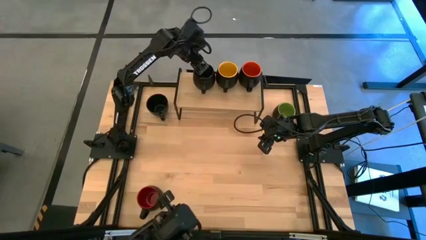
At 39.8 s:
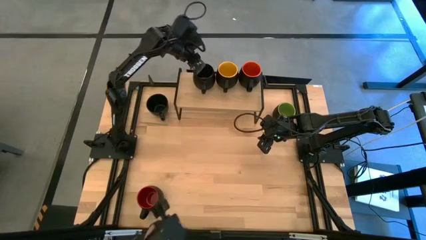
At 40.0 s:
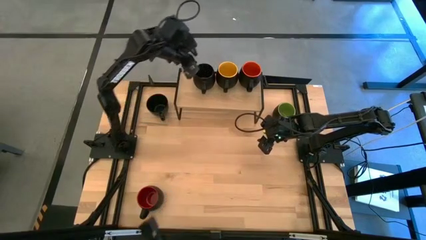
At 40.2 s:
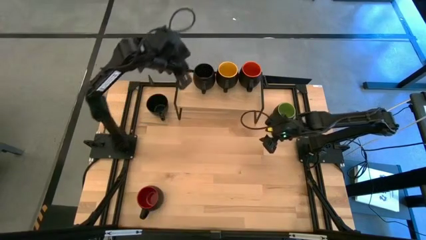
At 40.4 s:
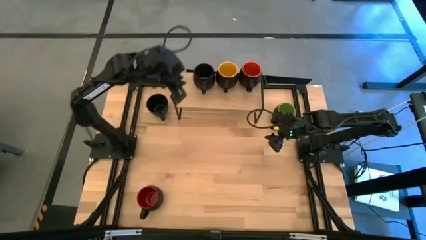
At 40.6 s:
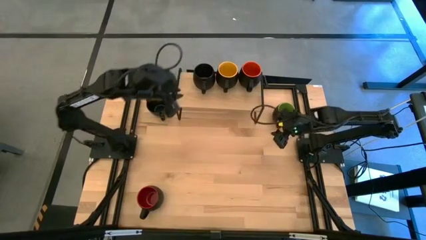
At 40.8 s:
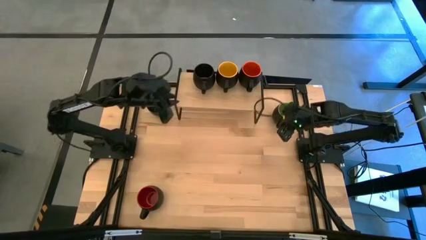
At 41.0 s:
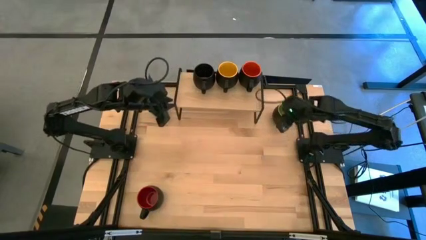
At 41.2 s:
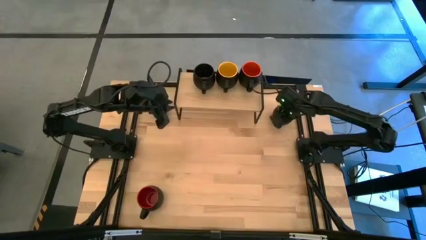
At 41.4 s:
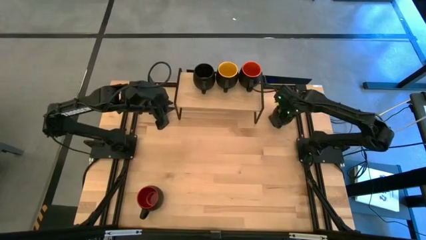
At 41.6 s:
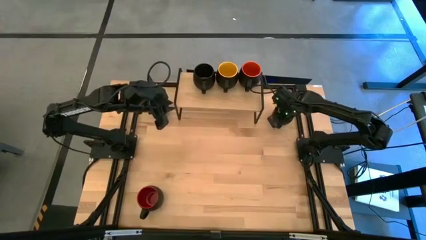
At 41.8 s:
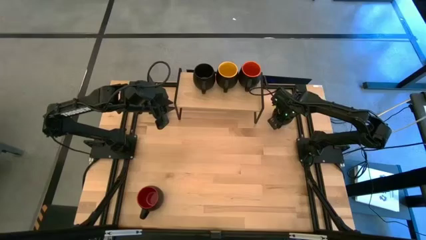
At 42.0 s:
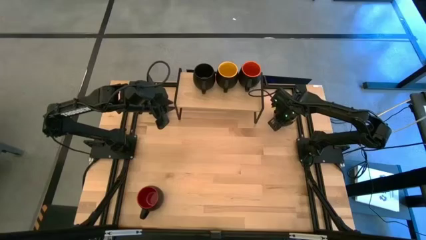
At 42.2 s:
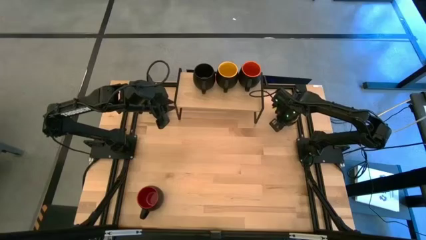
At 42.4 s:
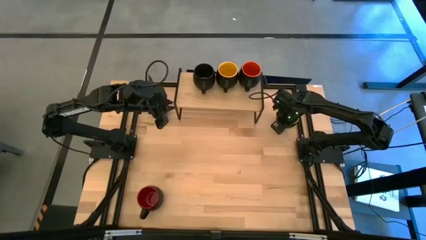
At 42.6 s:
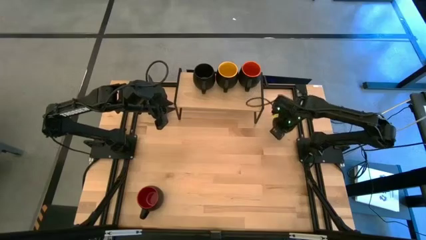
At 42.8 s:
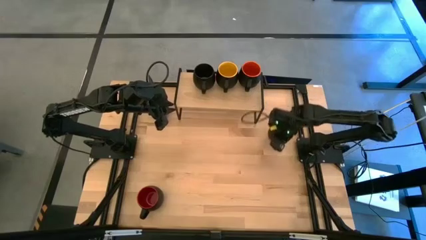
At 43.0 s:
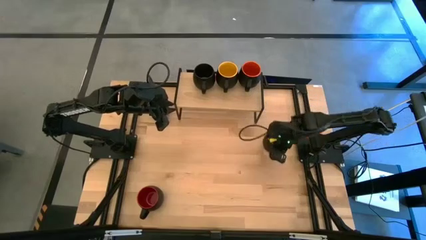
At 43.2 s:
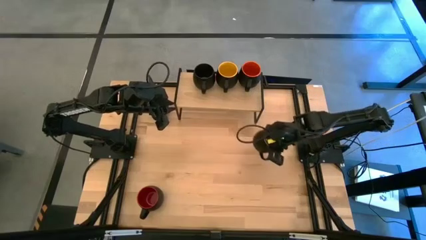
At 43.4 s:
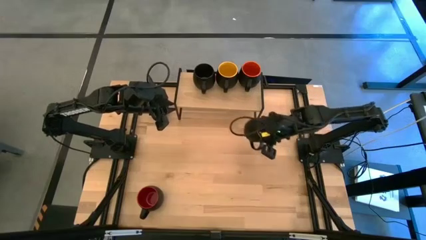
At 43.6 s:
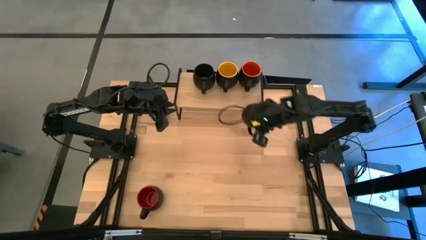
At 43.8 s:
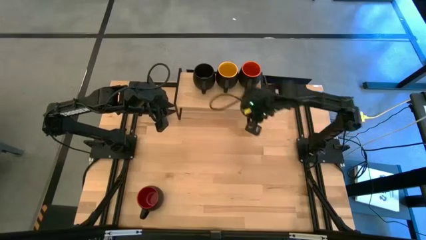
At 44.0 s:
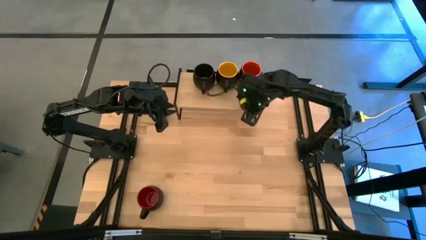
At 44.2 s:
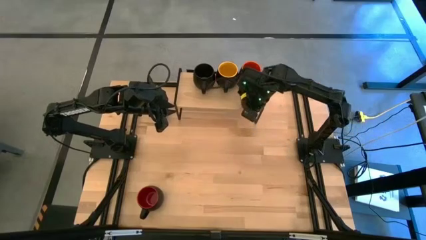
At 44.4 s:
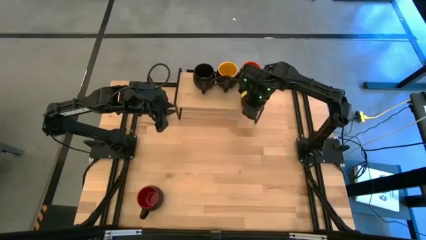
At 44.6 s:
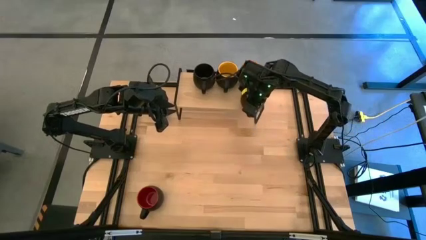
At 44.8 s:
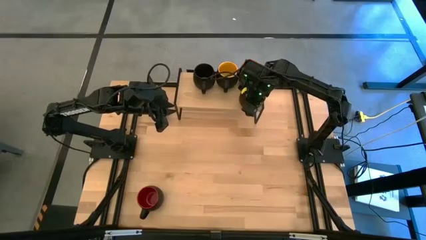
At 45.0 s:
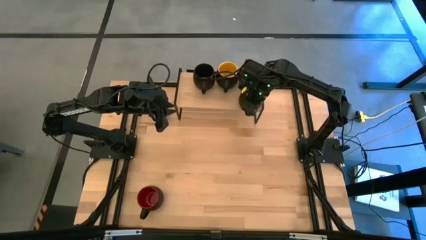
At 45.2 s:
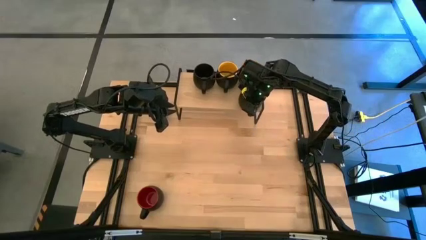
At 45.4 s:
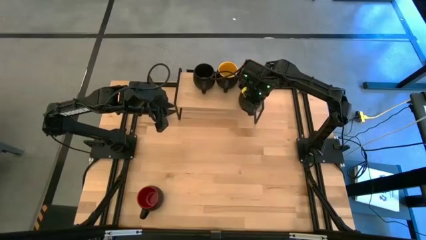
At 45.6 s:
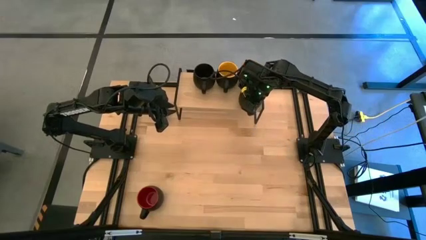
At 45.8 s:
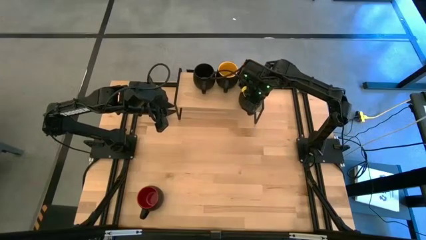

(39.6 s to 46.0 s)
Task: Place coffee mugs
Put the green cup on the shelf aligned with the other orange cup

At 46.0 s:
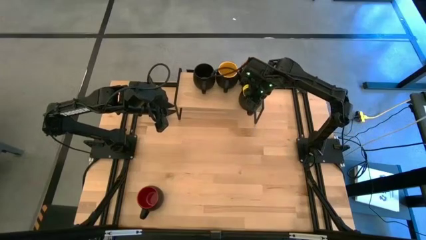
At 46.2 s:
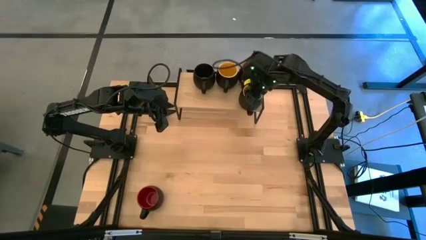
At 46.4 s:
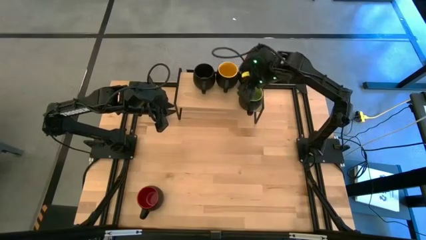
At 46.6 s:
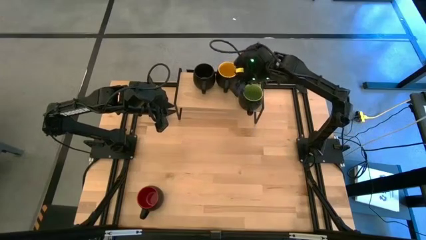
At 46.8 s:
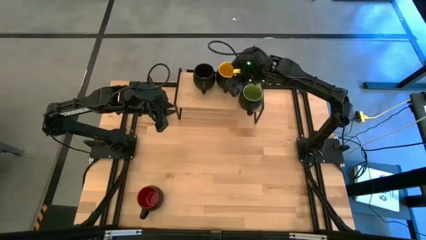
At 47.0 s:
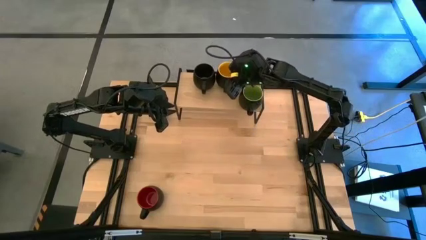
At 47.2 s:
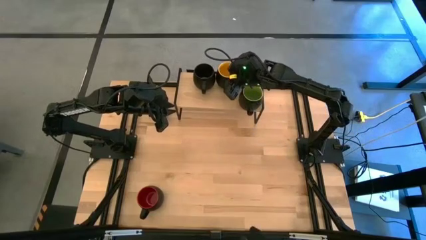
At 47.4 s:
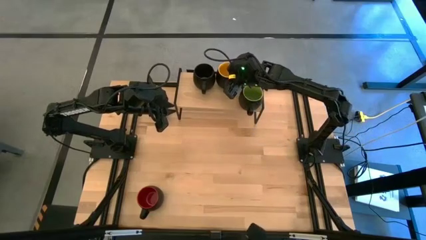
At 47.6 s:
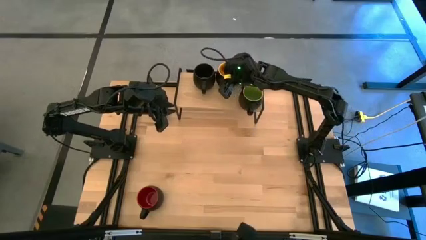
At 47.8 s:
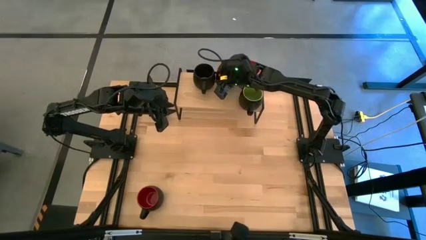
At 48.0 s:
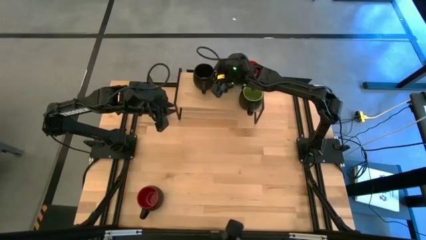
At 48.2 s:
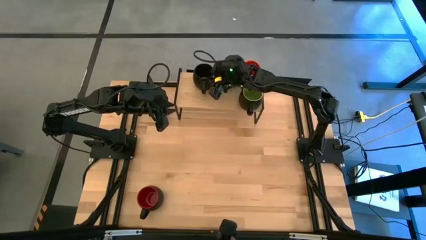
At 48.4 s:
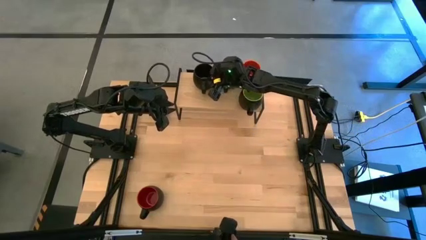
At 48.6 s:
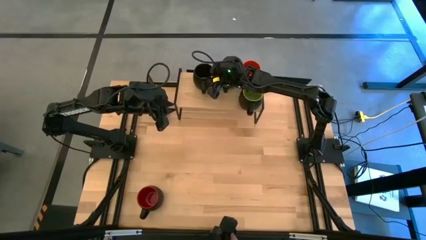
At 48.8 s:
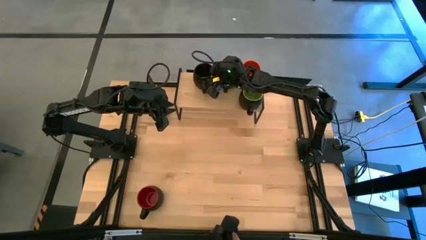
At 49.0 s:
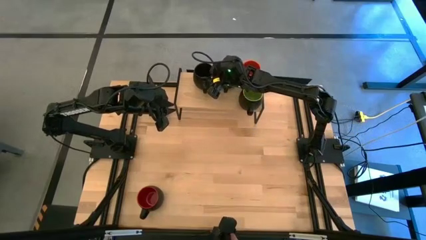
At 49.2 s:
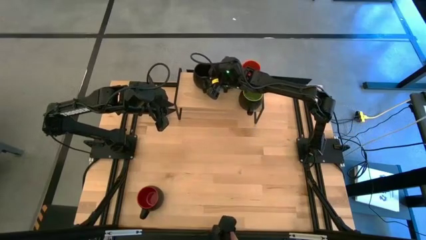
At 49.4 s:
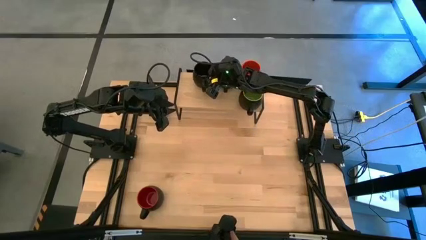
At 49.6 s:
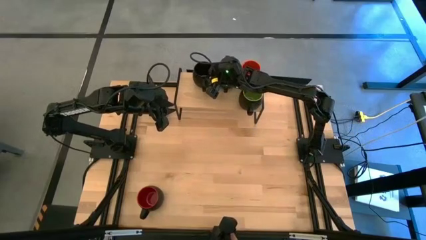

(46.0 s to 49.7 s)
Adjust the black cup on the shelf
